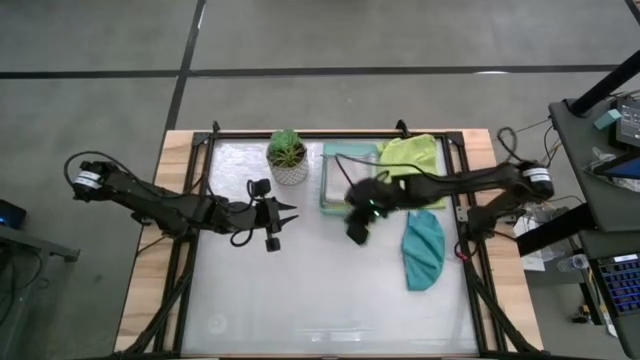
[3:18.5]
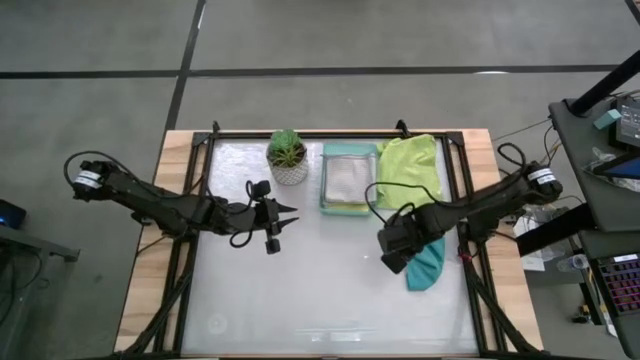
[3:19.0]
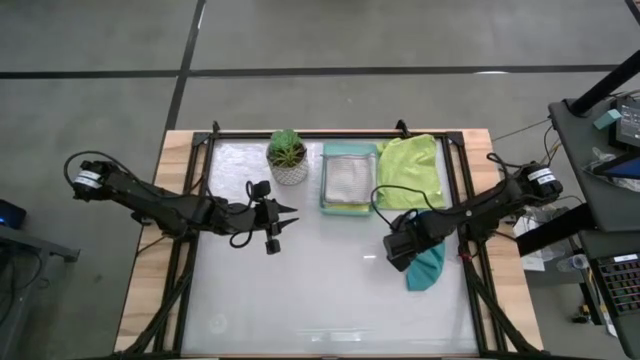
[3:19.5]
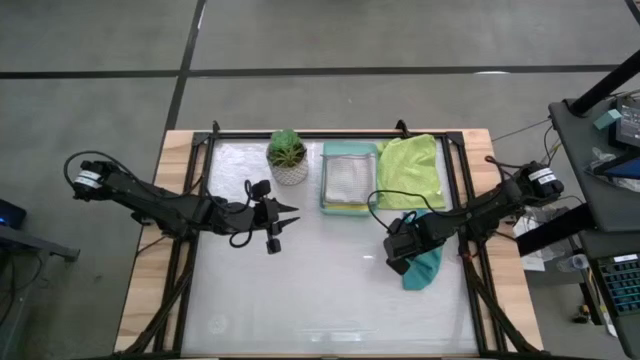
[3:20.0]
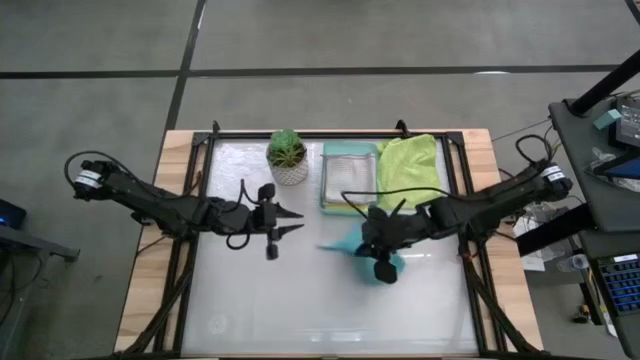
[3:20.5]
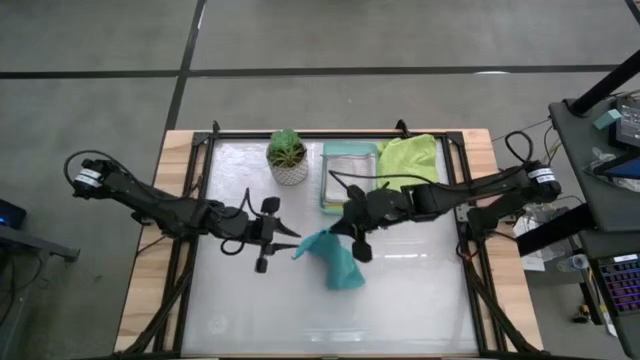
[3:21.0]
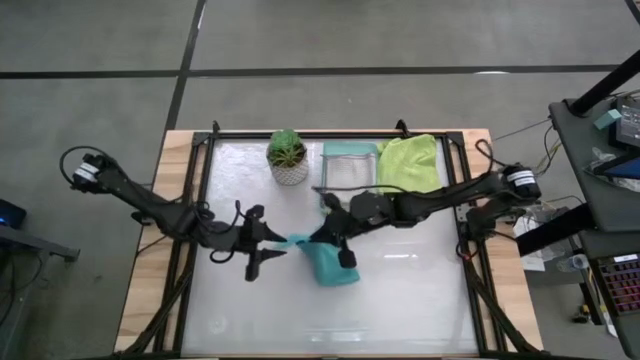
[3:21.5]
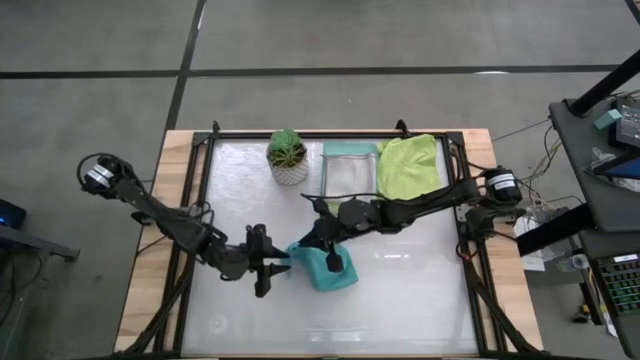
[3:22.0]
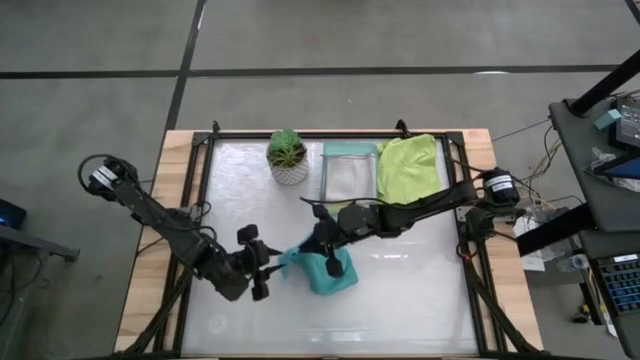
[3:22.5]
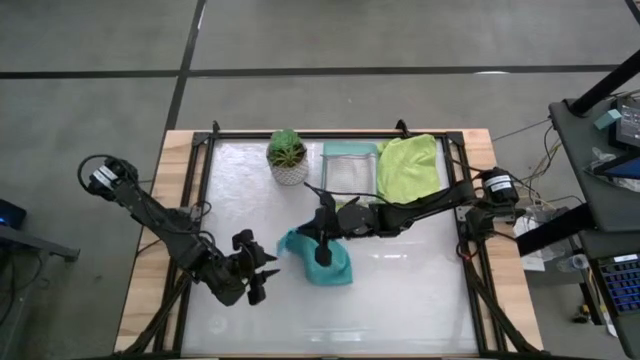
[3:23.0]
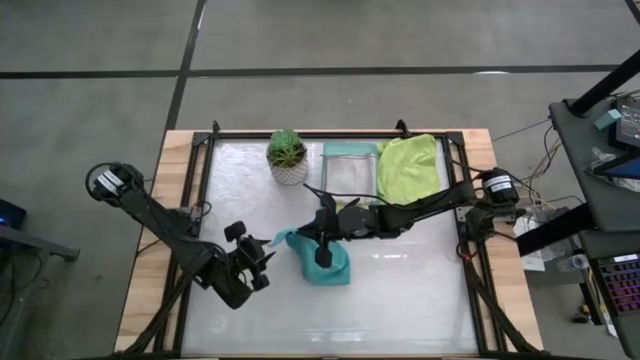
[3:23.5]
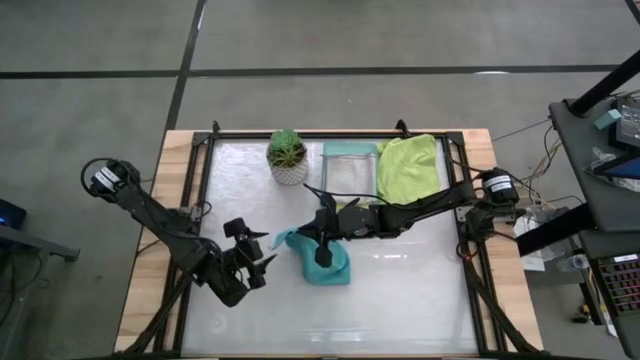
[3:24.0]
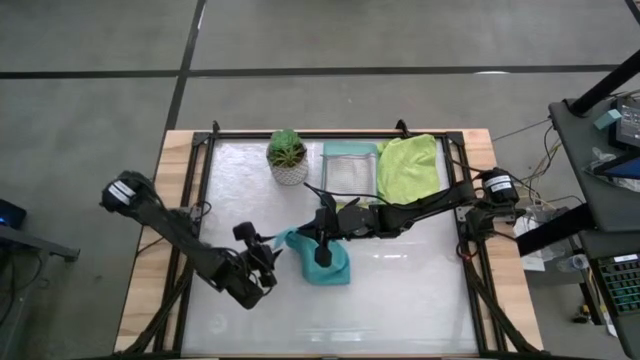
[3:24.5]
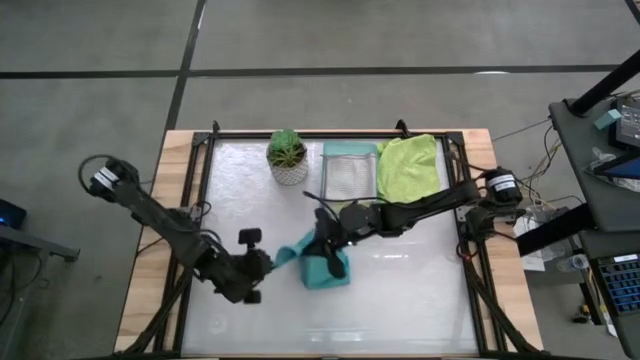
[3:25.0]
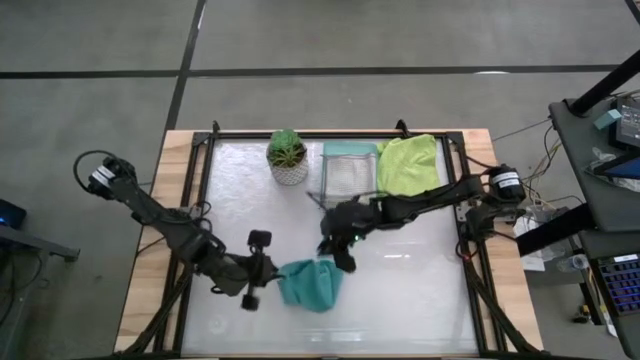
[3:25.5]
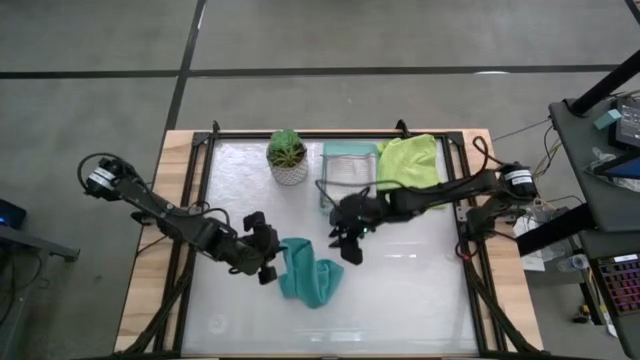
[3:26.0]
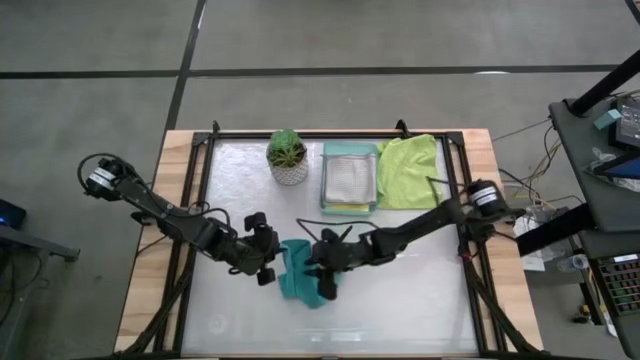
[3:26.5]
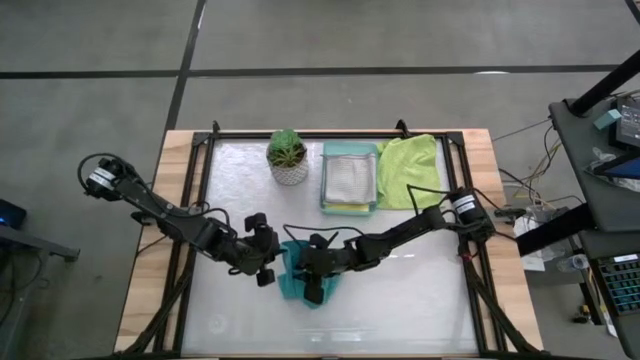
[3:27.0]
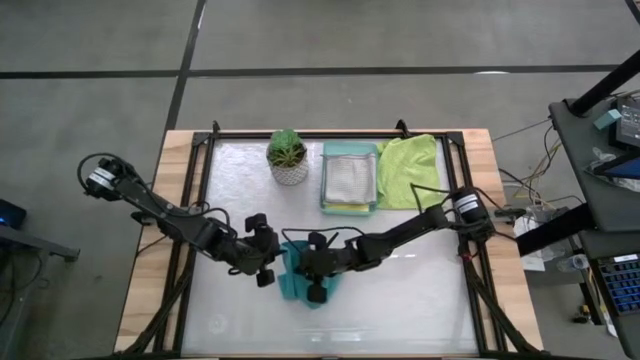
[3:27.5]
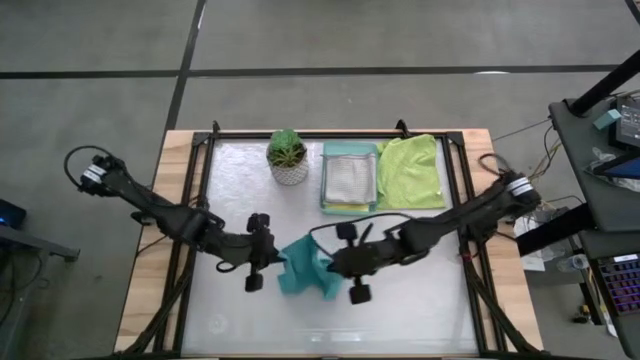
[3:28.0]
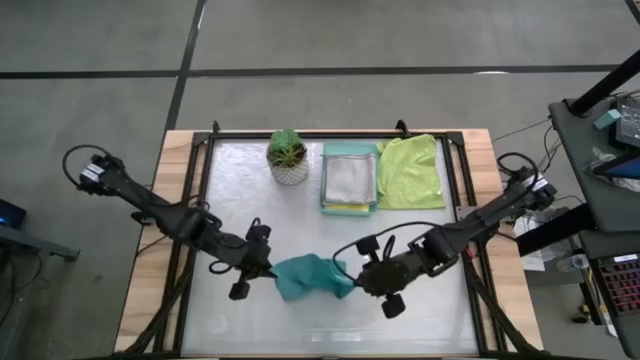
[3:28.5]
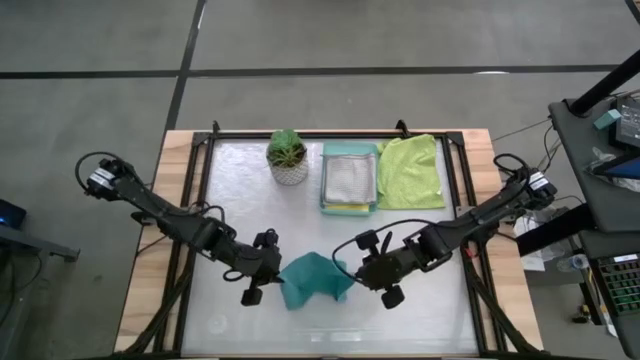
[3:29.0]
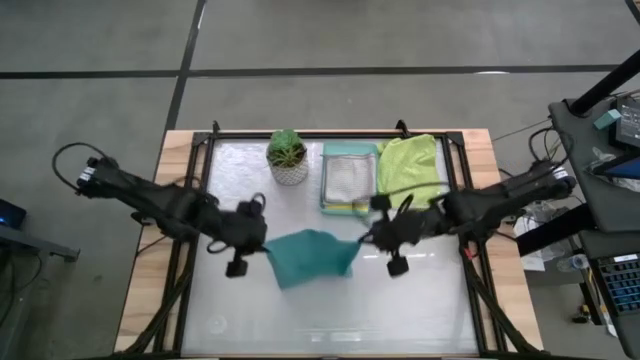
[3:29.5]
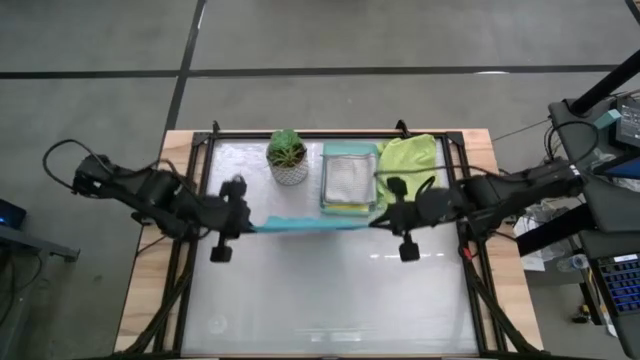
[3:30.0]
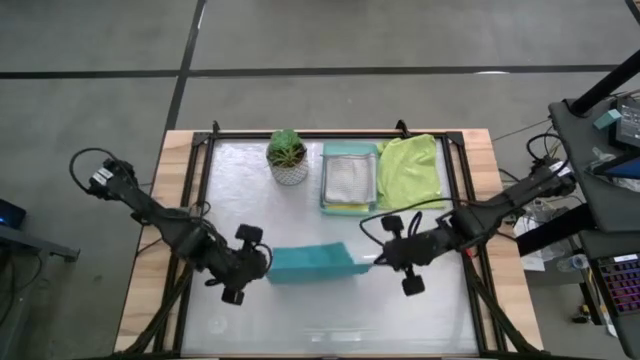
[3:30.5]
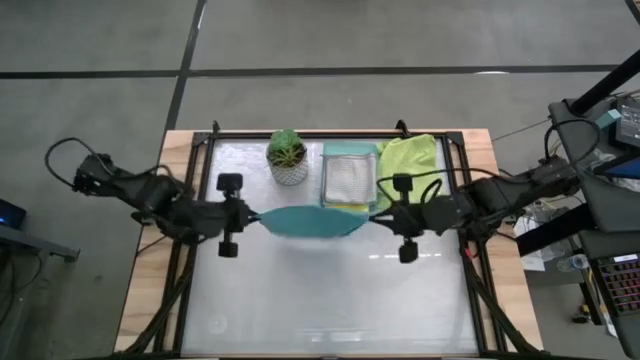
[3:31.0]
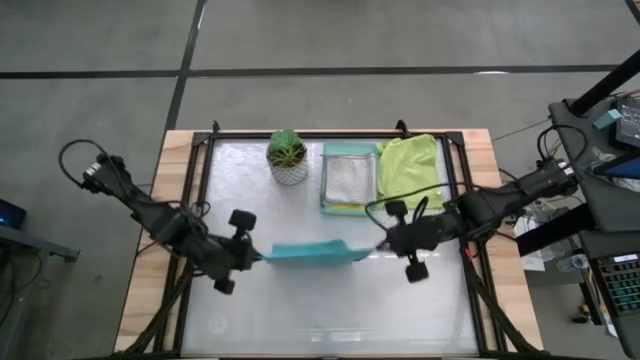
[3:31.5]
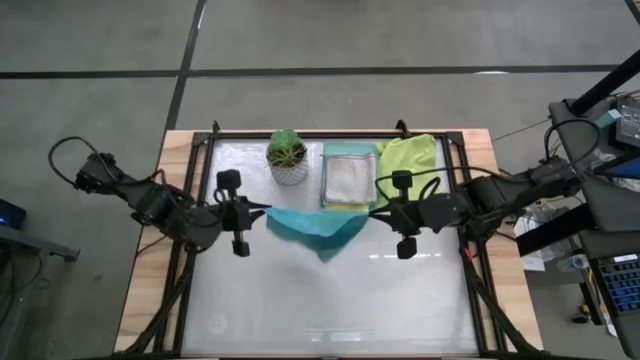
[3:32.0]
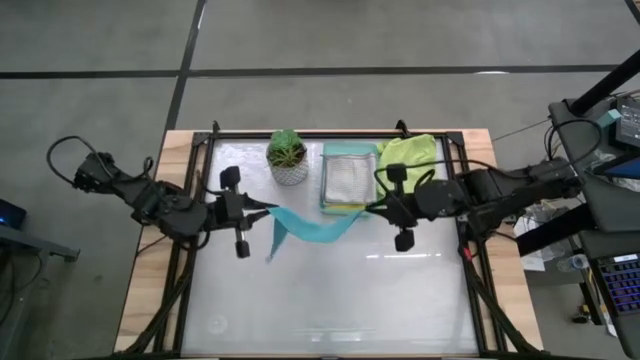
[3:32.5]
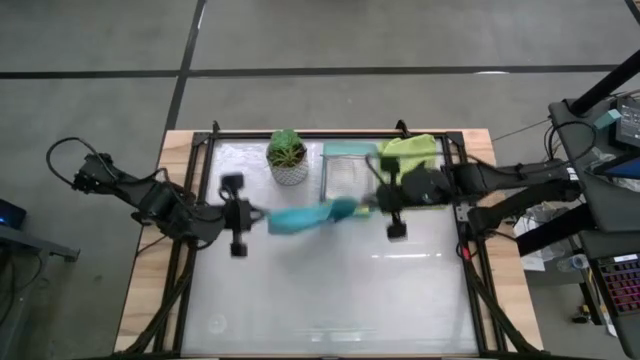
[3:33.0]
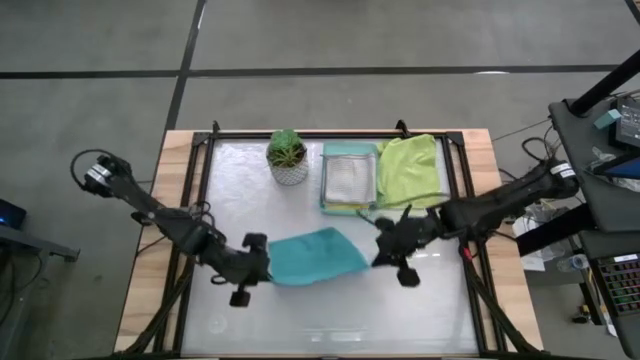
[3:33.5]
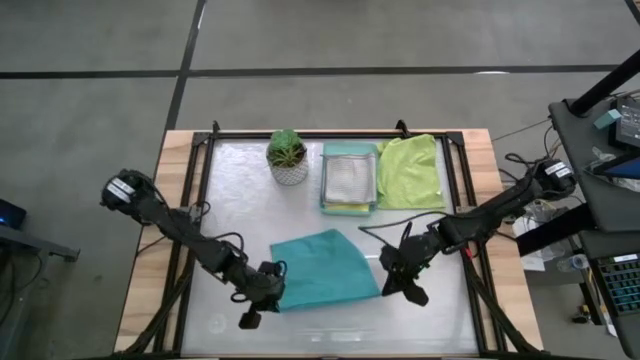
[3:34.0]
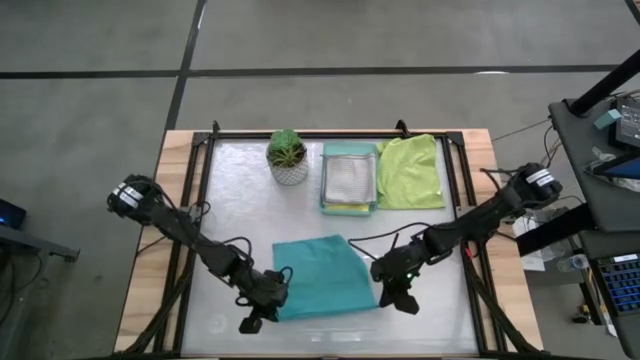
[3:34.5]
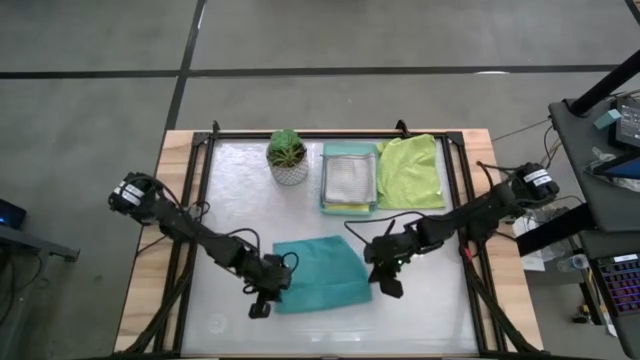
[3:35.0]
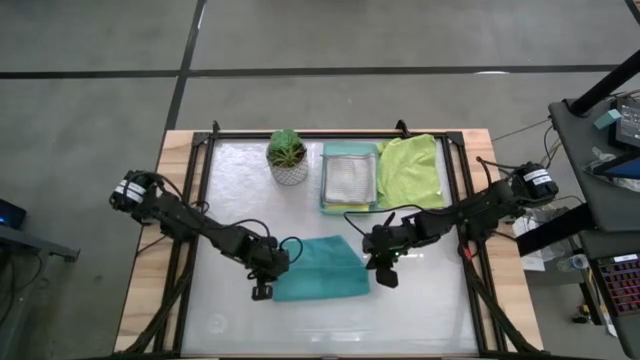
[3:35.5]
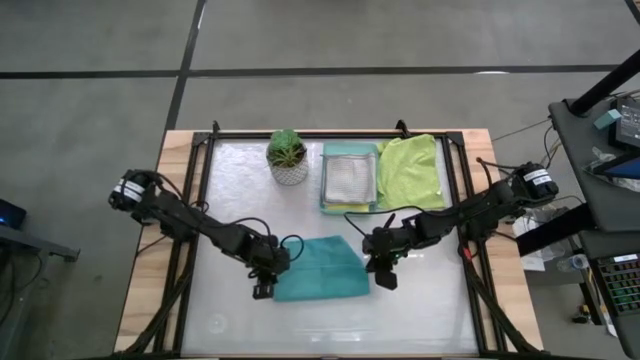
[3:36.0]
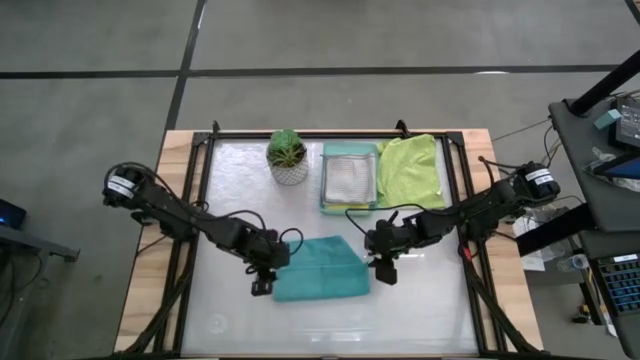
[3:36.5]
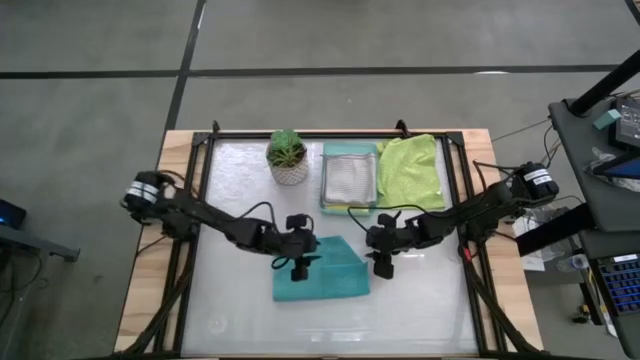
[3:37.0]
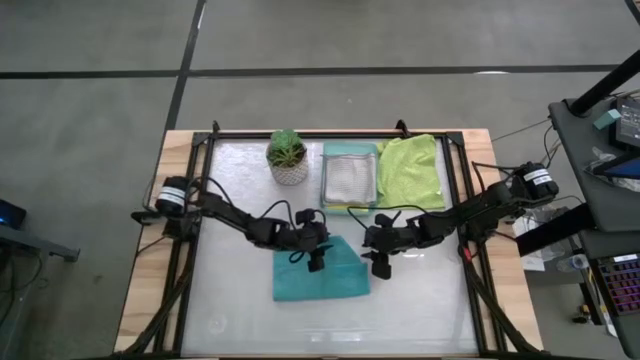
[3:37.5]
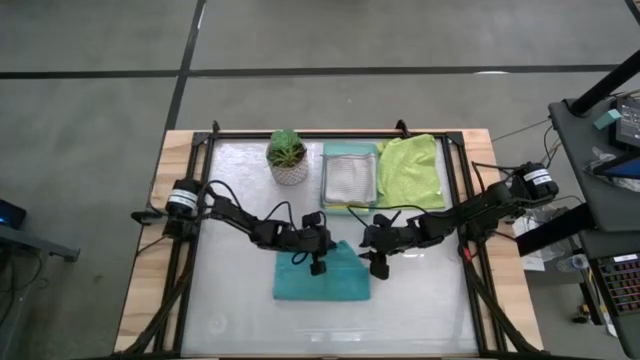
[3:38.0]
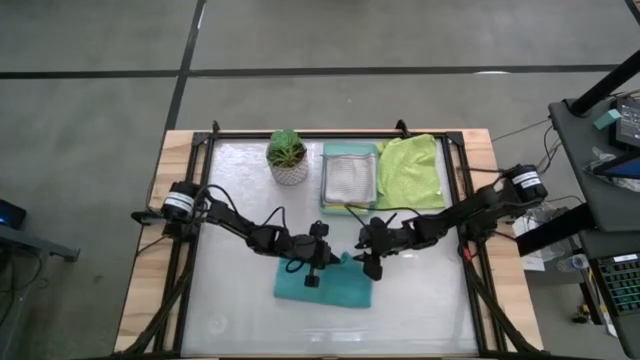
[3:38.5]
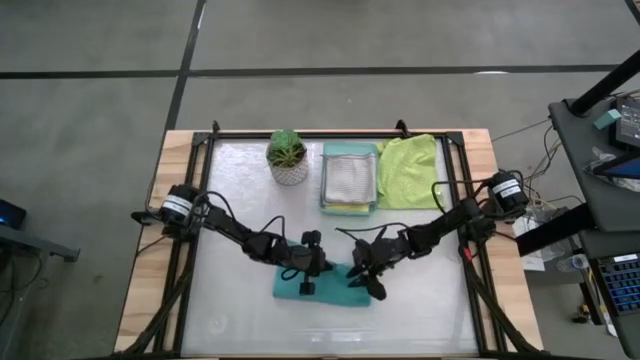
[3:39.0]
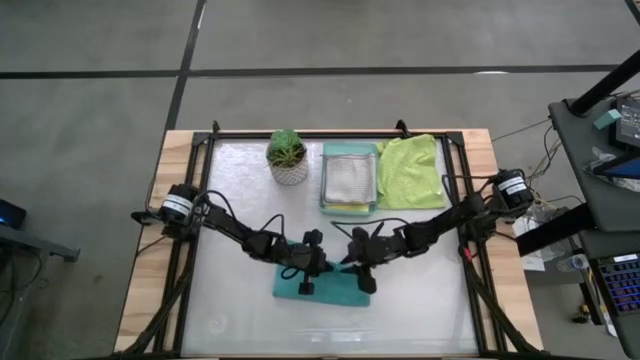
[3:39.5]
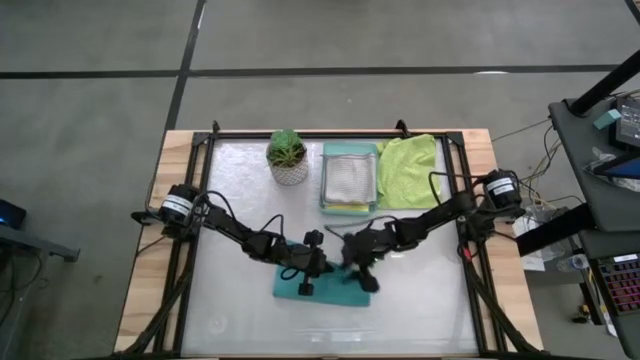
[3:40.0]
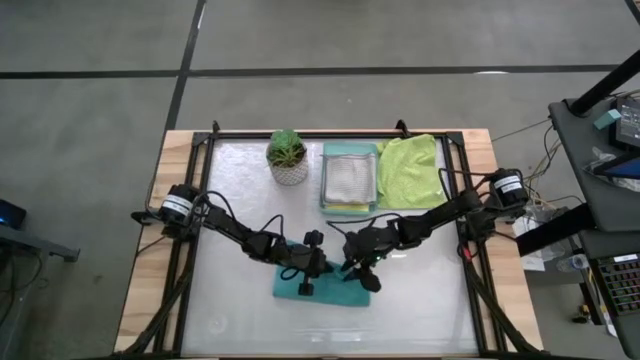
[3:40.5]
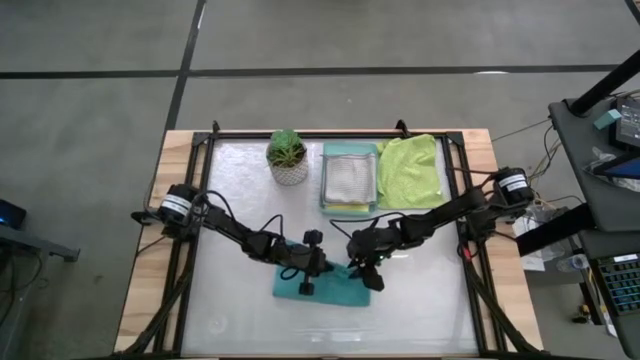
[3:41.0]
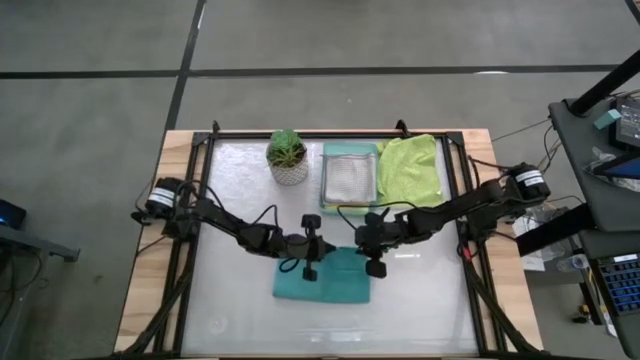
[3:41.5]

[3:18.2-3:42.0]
Task: Fold microfiber towels
Fold the blue microfiber cloth
